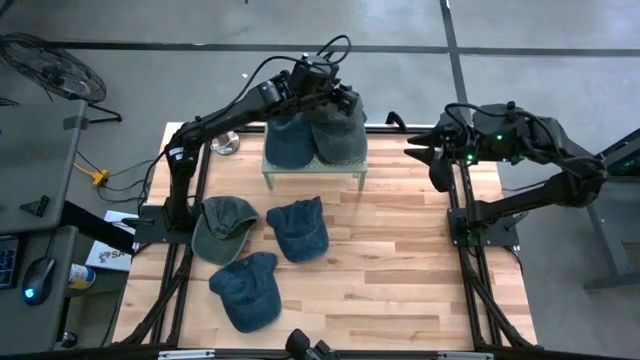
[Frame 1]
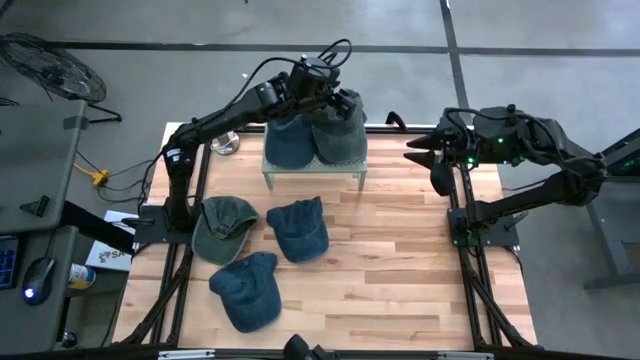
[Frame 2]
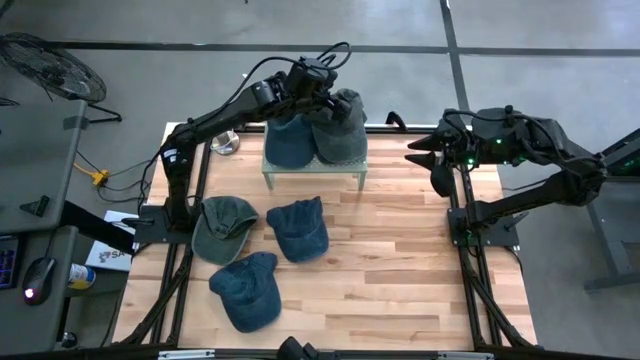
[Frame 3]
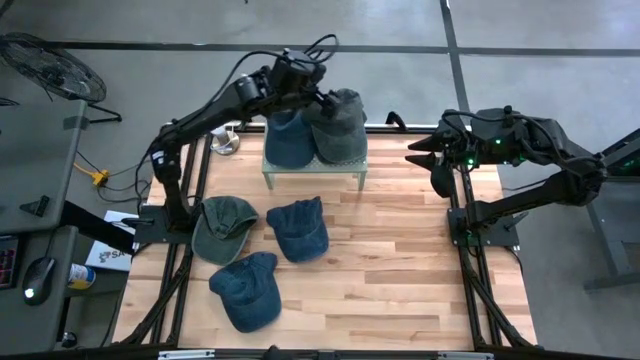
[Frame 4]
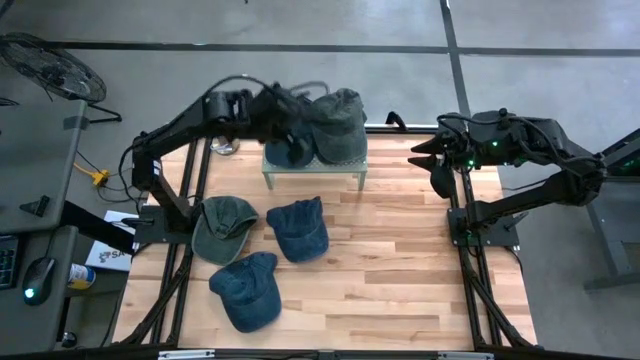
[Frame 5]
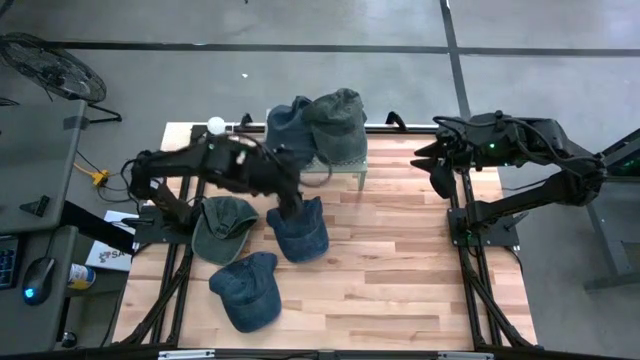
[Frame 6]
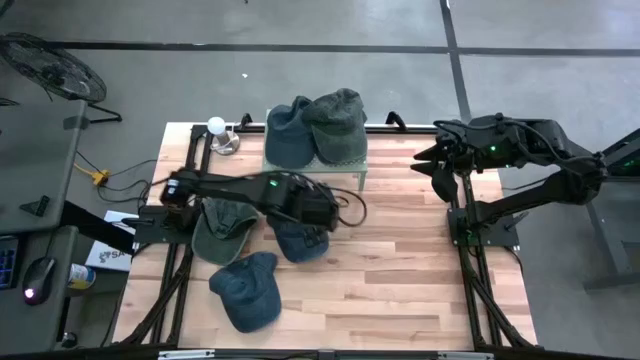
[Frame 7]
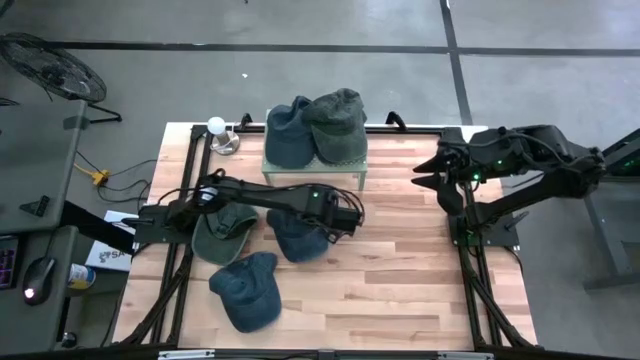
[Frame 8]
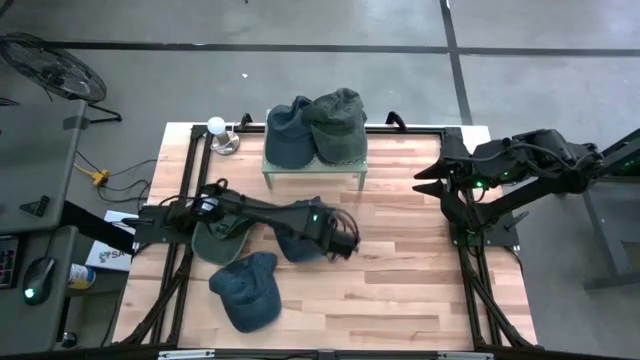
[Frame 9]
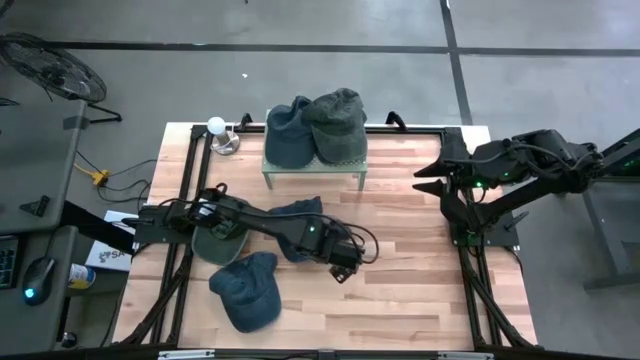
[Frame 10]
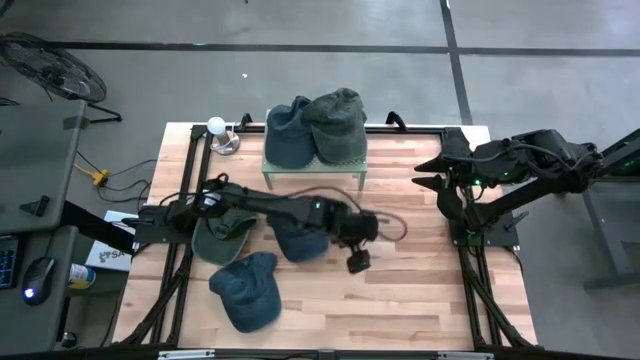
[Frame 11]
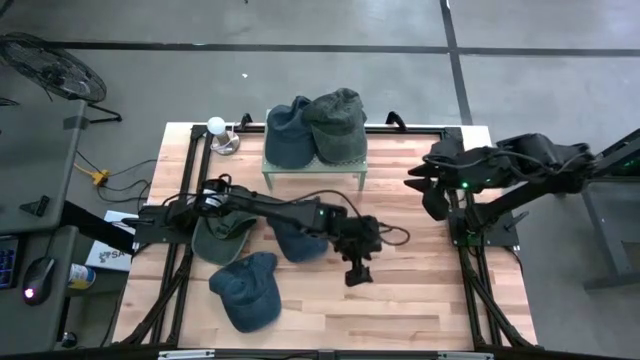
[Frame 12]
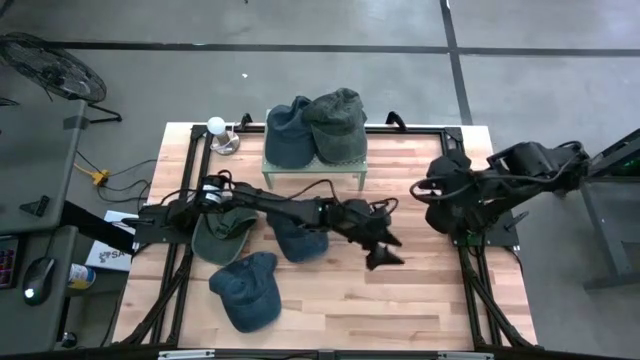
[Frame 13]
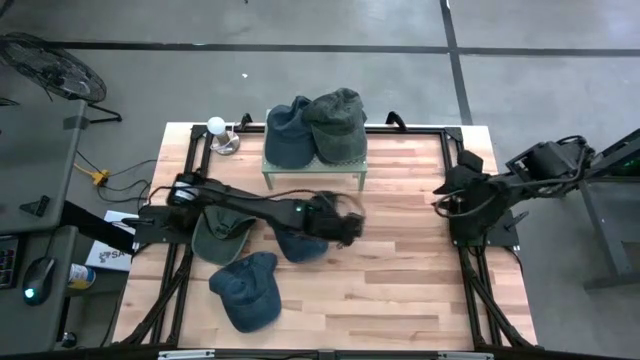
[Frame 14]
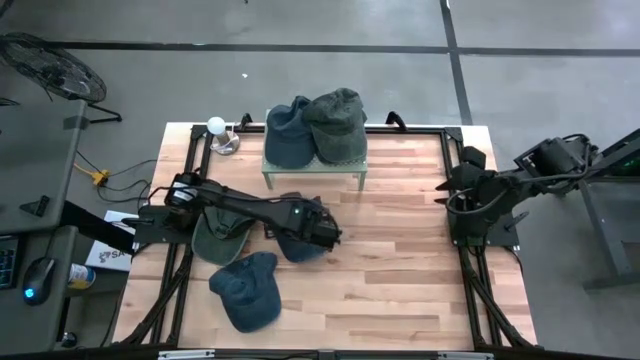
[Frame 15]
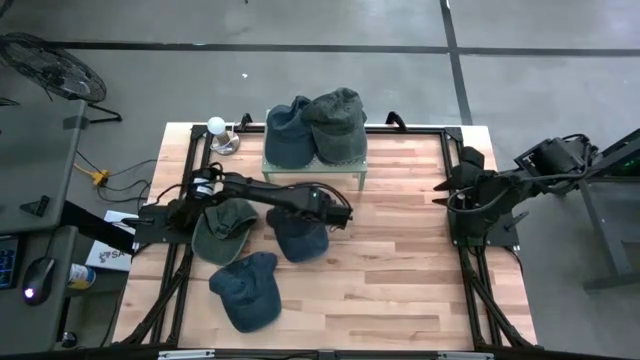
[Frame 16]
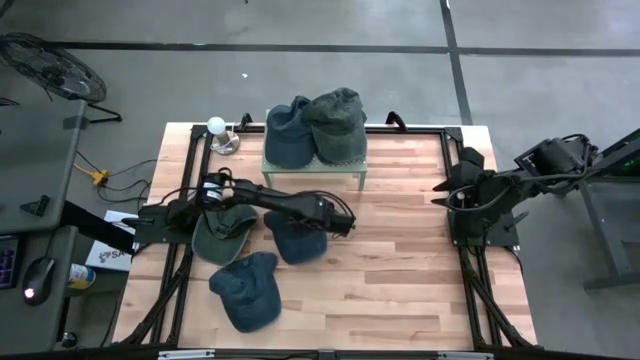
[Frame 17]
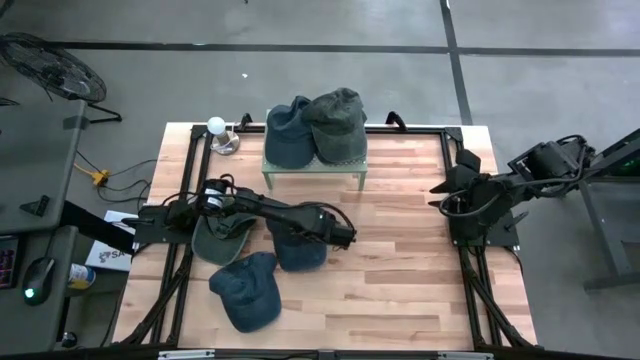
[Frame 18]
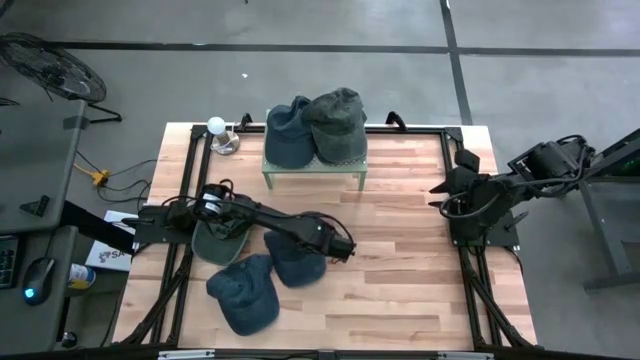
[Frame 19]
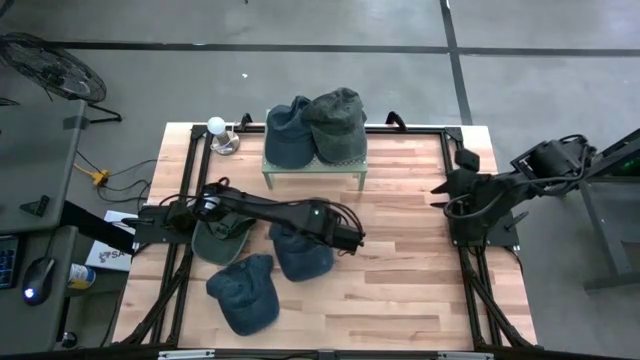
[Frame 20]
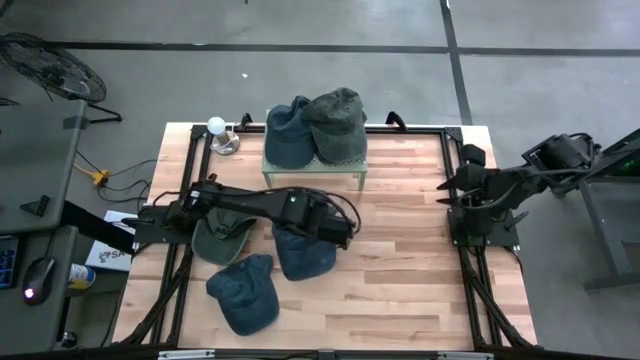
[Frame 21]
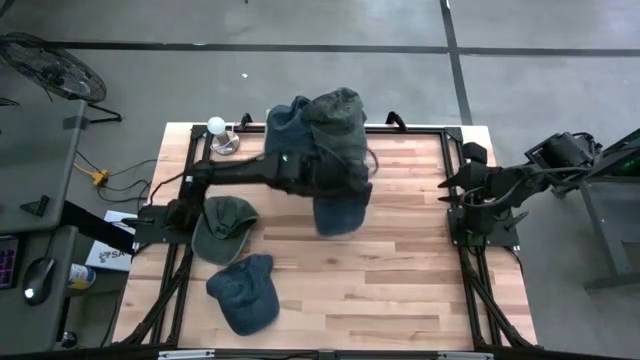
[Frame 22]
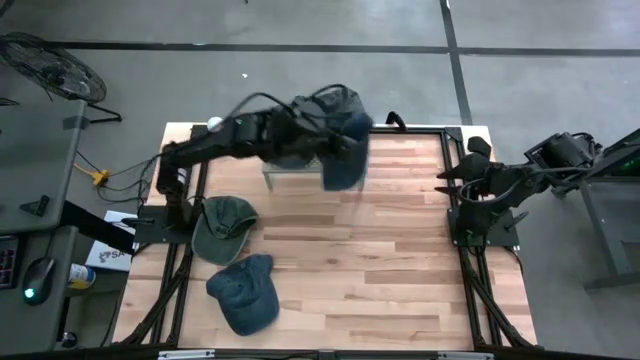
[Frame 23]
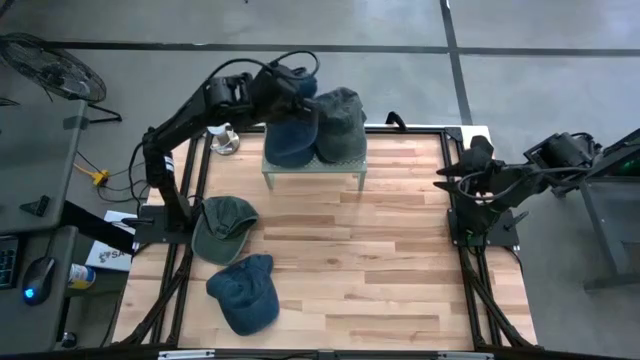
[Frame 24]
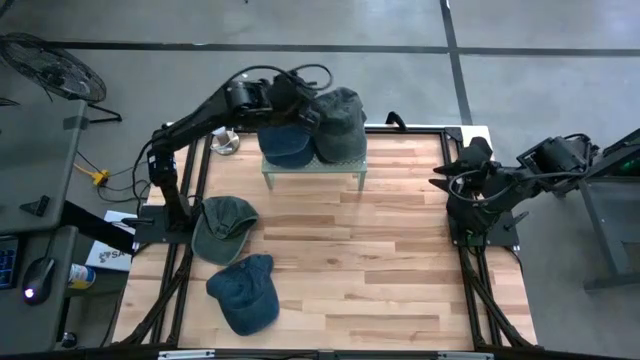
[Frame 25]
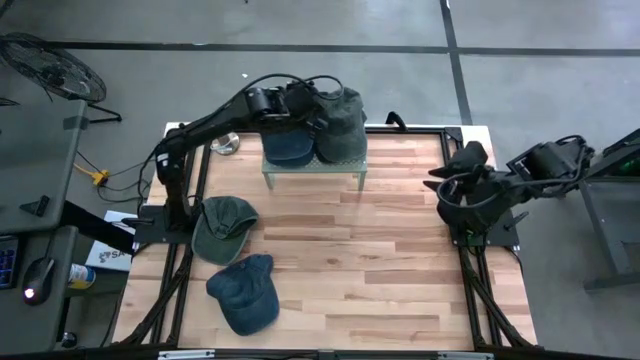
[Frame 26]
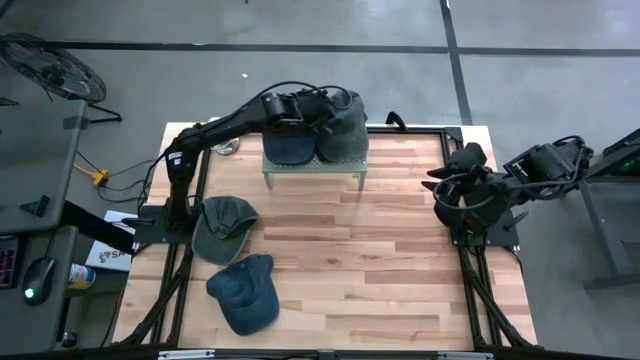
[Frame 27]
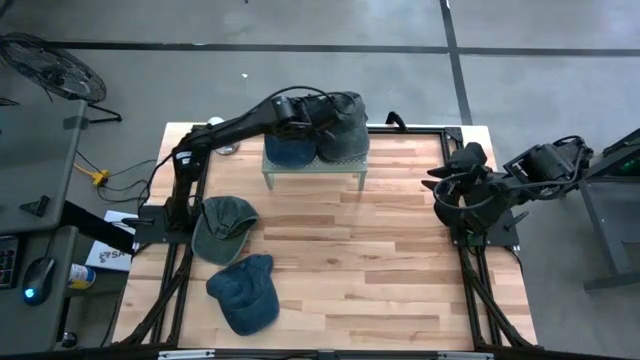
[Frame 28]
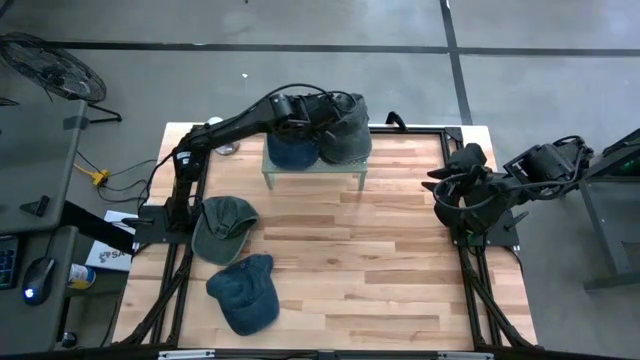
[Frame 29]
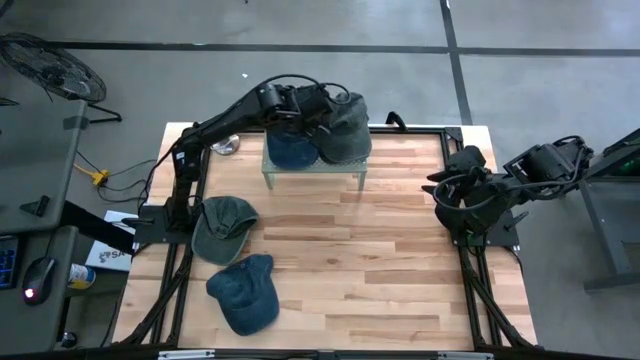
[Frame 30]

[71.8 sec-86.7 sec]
Task: Pick & Place hat
Stack the top blue cap on the blue cap on the shelf

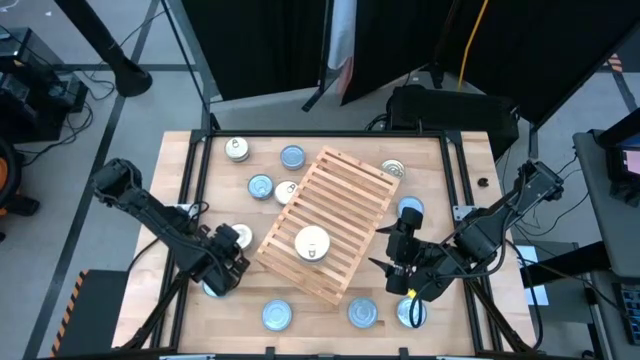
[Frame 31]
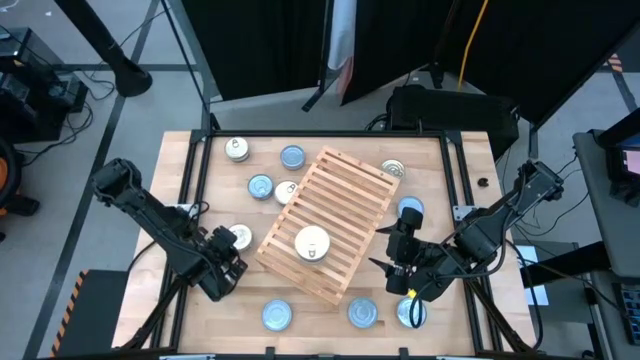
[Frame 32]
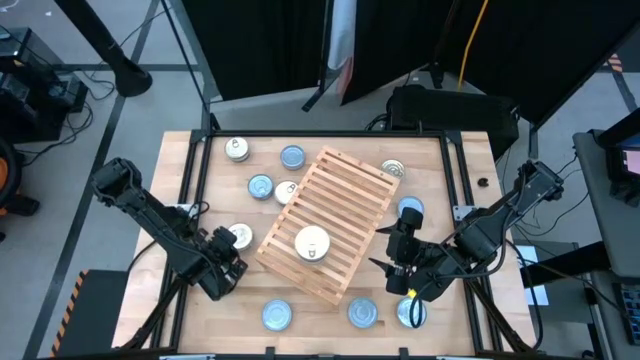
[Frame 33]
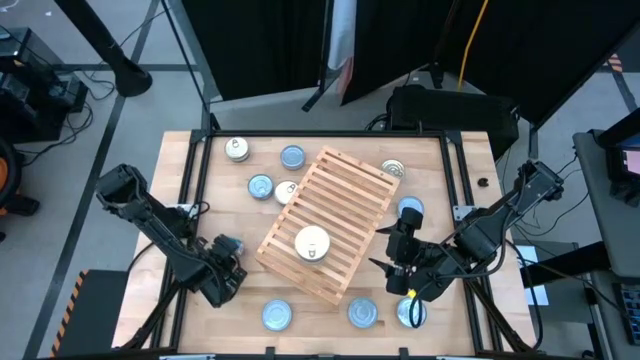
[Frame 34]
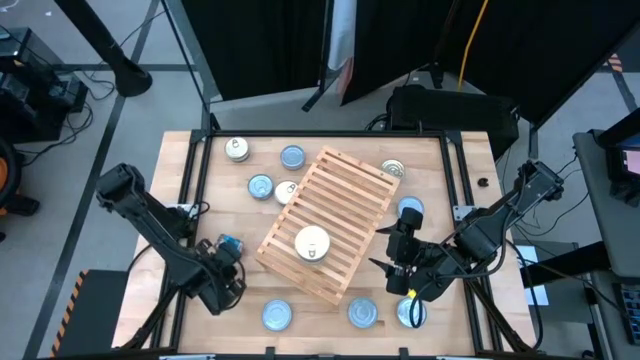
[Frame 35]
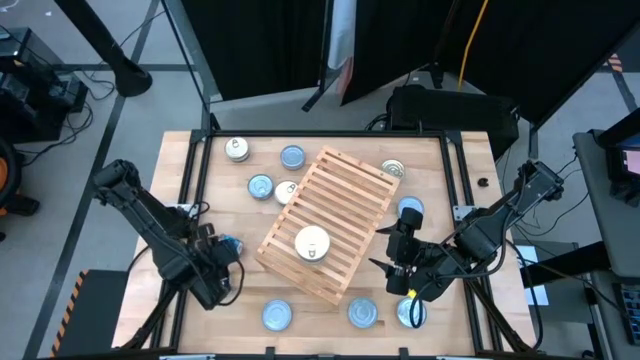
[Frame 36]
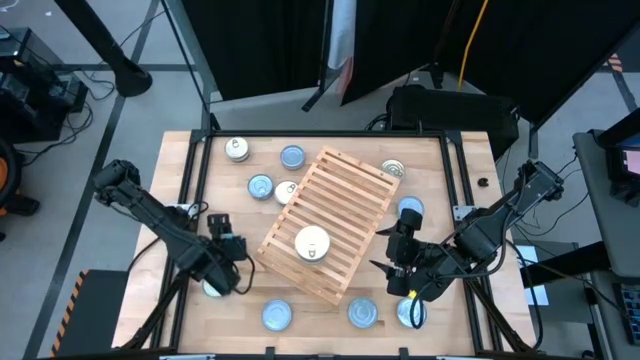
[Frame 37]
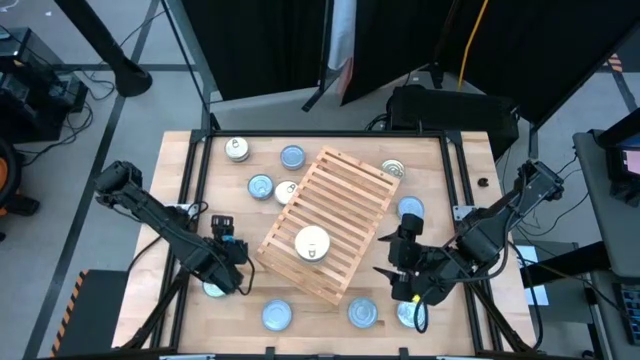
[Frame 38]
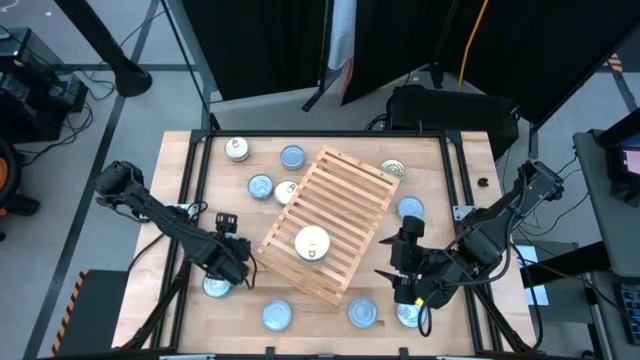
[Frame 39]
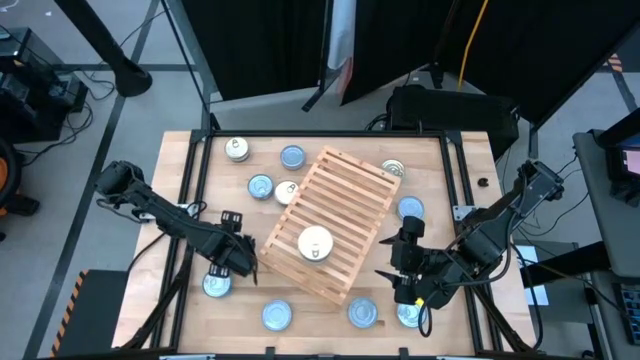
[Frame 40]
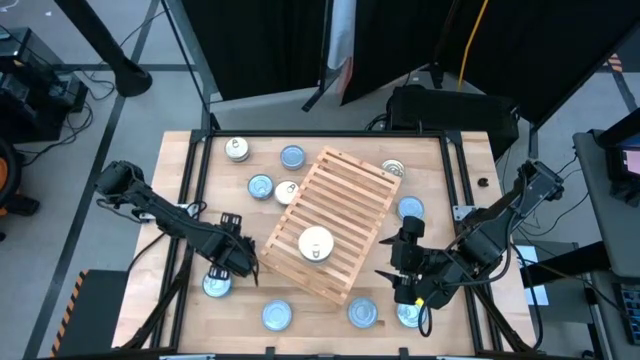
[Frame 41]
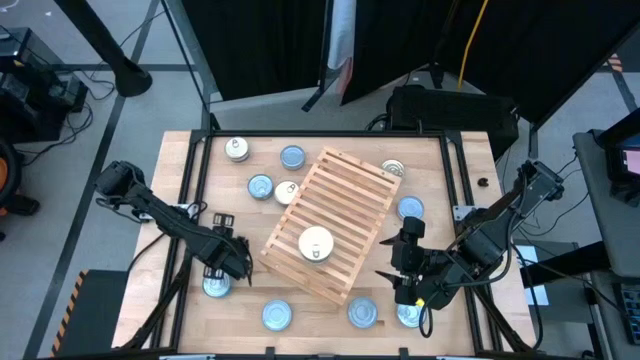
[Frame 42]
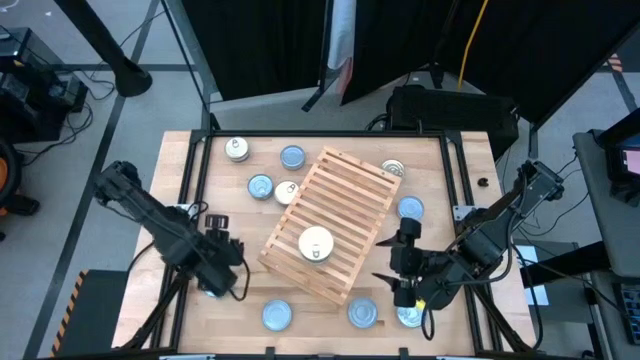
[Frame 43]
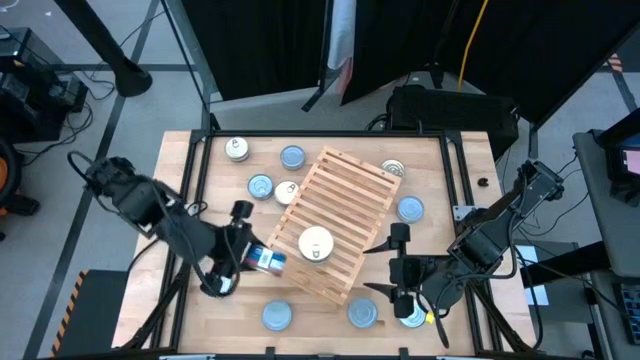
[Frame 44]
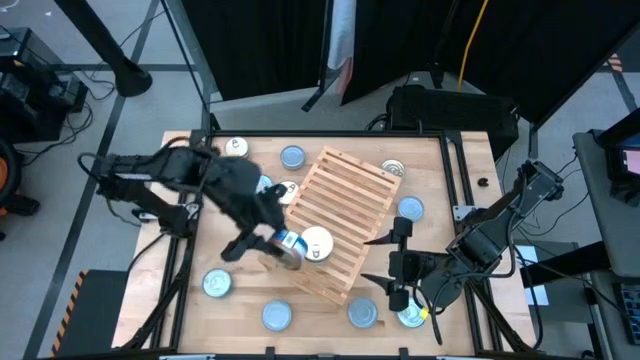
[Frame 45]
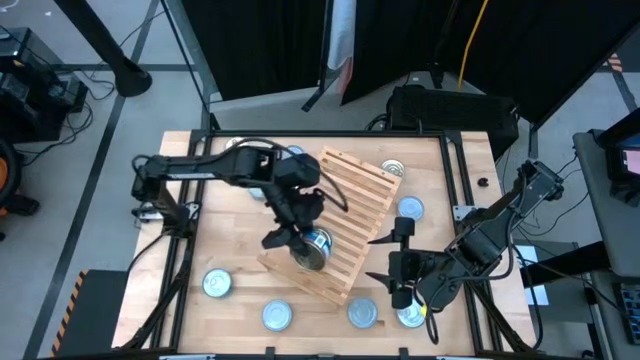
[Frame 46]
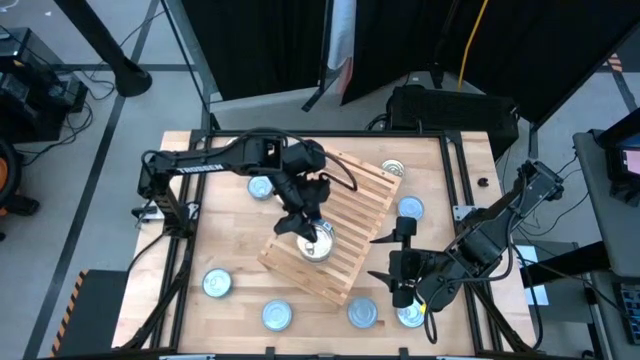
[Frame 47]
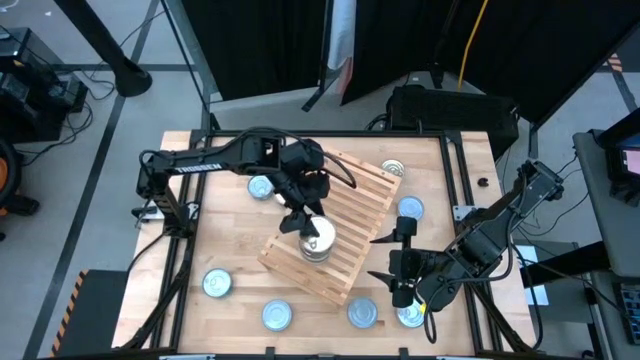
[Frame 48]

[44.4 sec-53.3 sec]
Task: Stack canned seafood by type on shelf
Stack the blue-pink tuna can on top of the other blue-pink tuna can on the shelf
